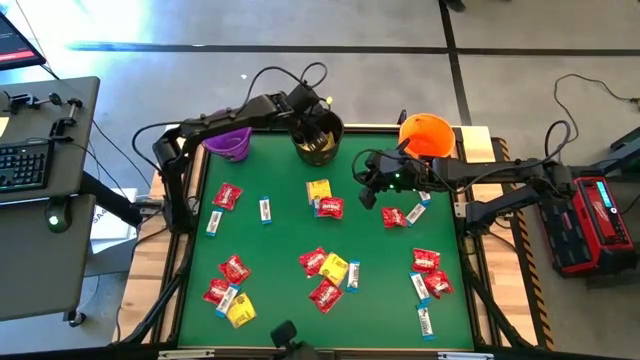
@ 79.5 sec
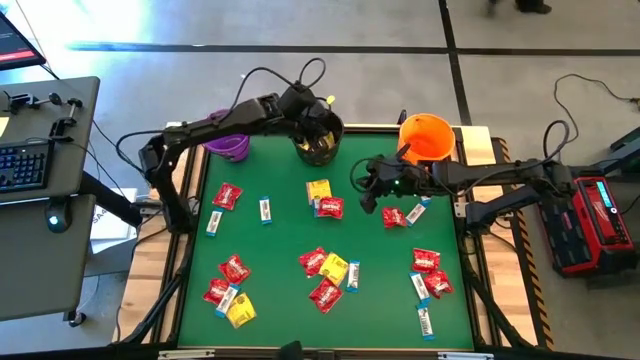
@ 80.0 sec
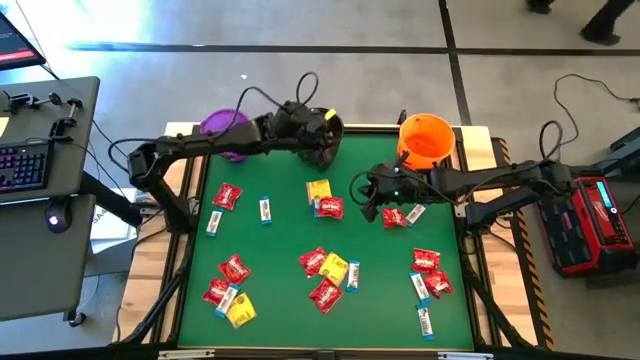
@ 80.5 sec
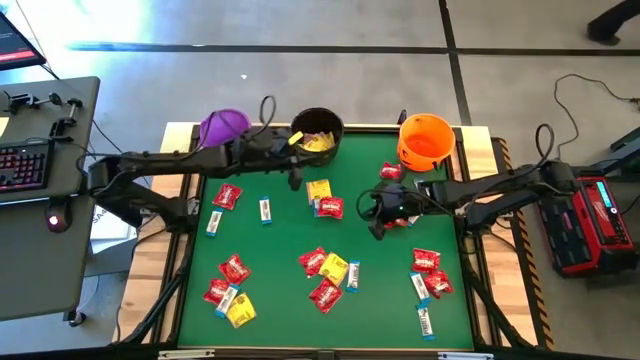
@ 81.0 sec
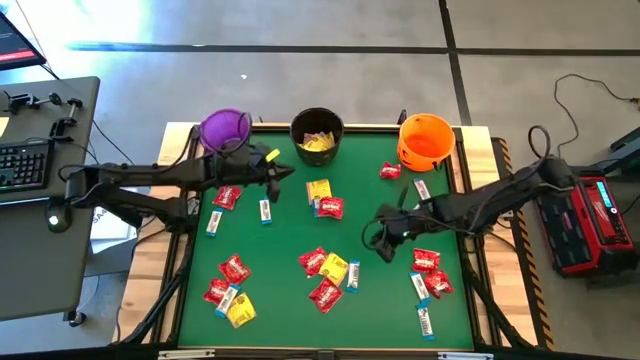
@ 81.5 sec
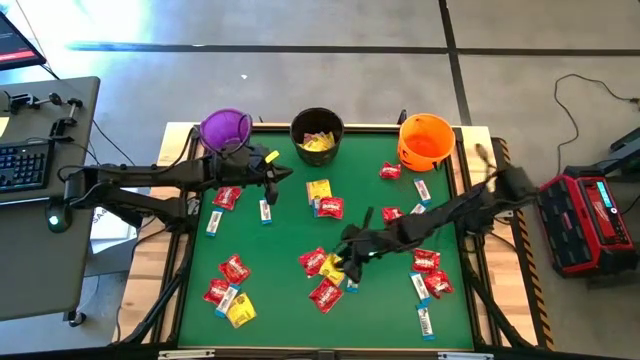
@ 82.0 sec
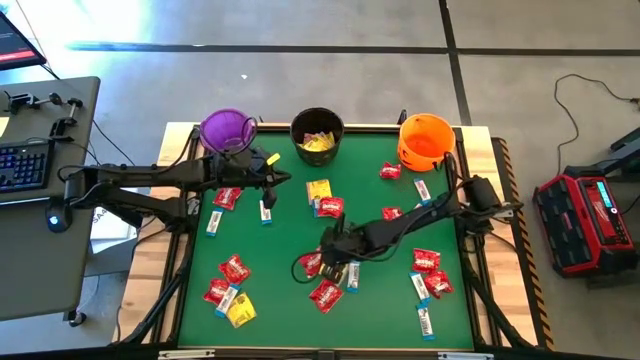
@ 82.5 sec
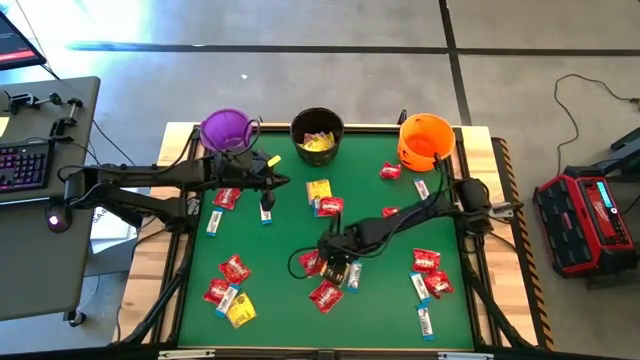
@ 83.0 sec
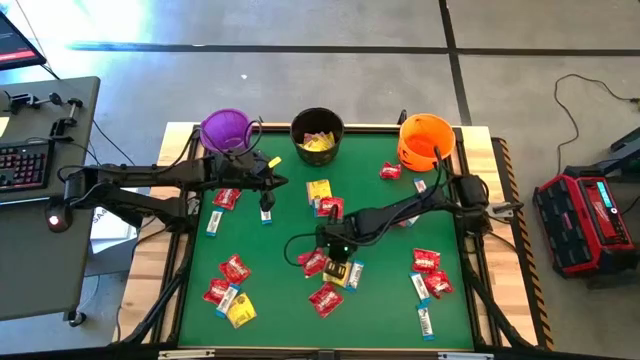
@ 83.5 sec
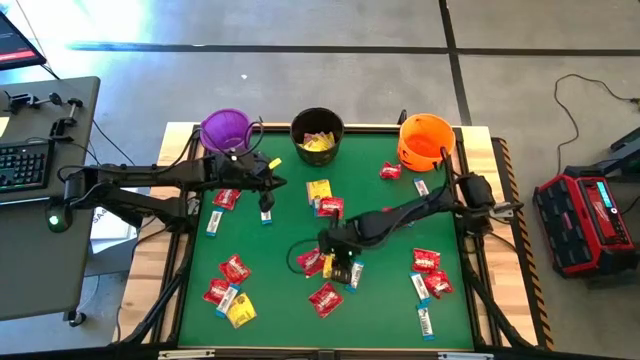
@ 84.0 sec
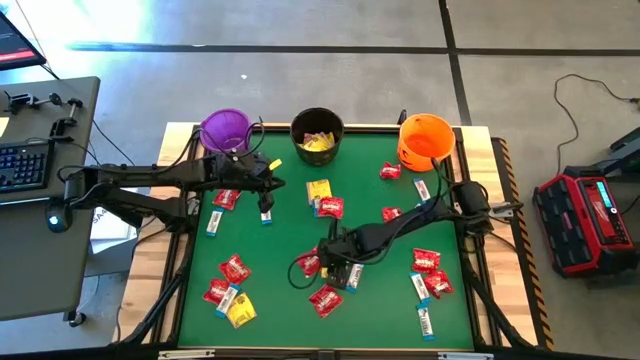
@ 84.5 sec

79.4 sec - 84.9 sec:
Task: Sort candy by brand, put in halloween buckets
Put the yellow candy pack into the black bucket

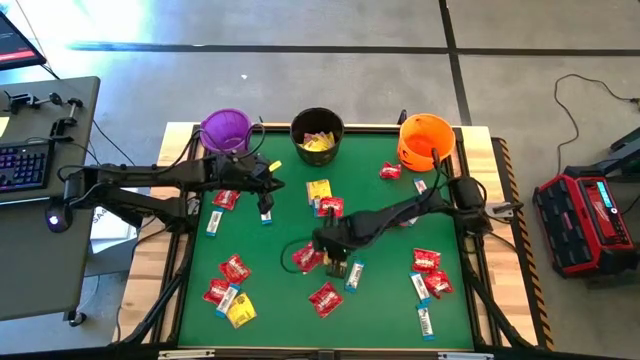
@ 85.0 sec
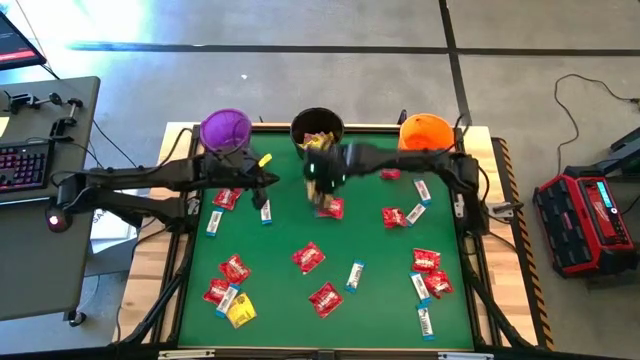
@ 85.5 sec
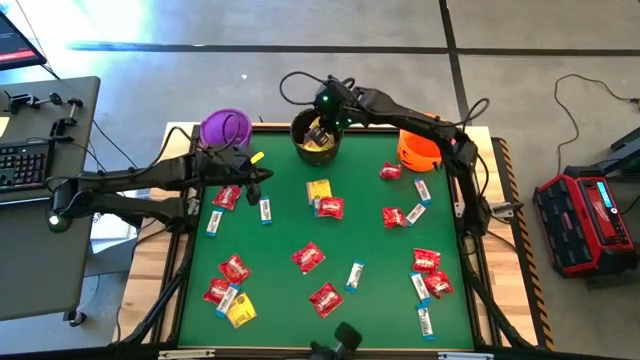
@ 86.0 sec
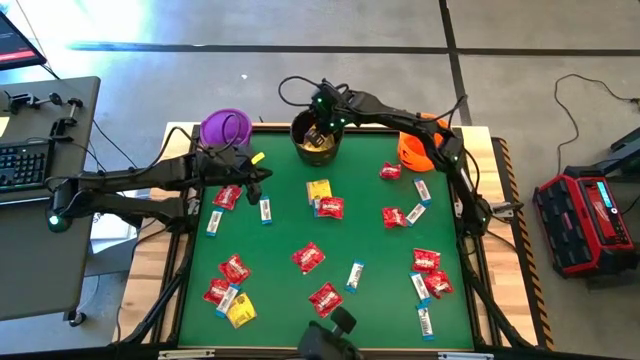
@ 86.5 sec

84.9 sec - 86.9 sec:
Put the yellow candy pack into the black bucket

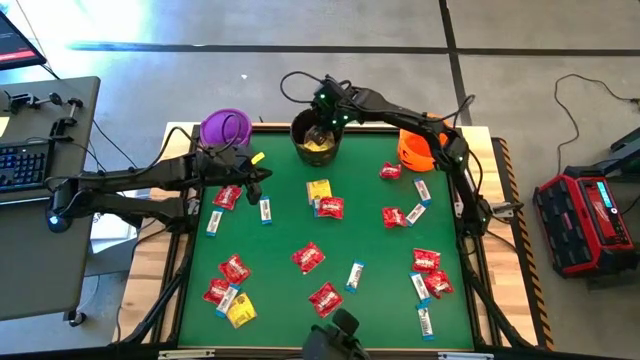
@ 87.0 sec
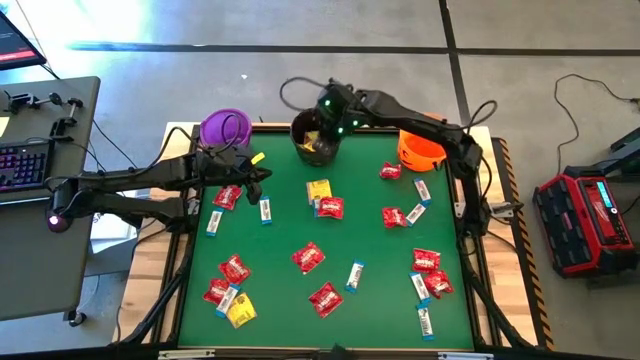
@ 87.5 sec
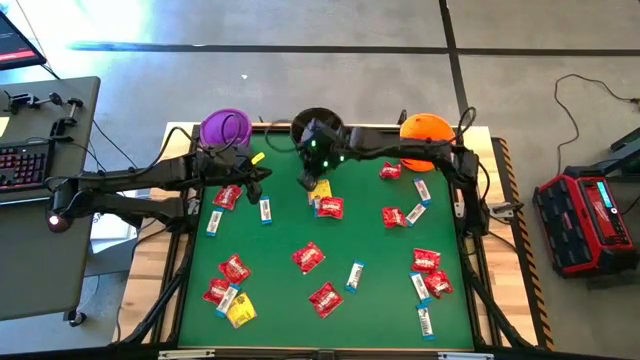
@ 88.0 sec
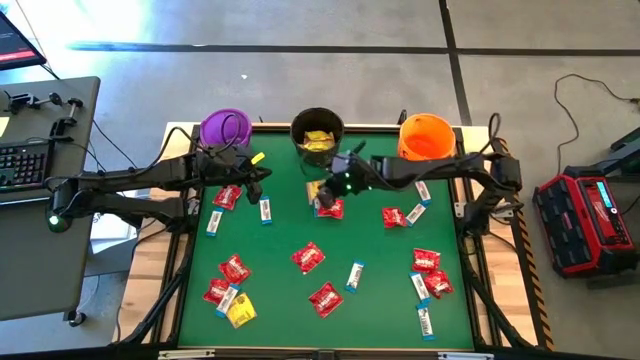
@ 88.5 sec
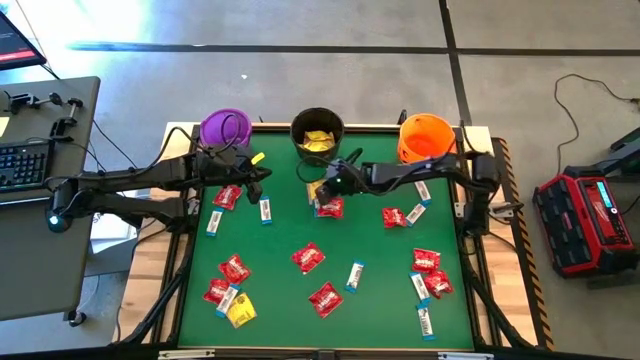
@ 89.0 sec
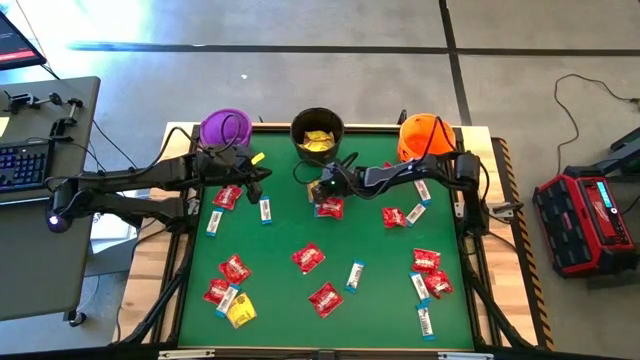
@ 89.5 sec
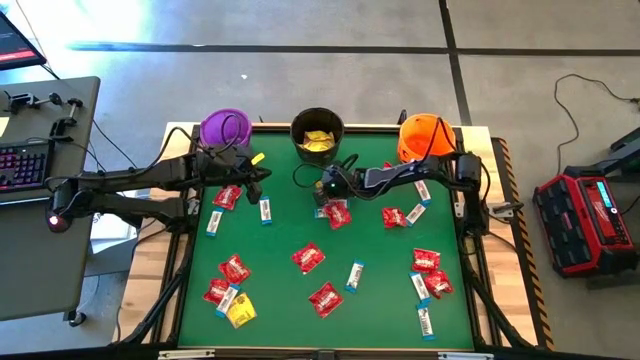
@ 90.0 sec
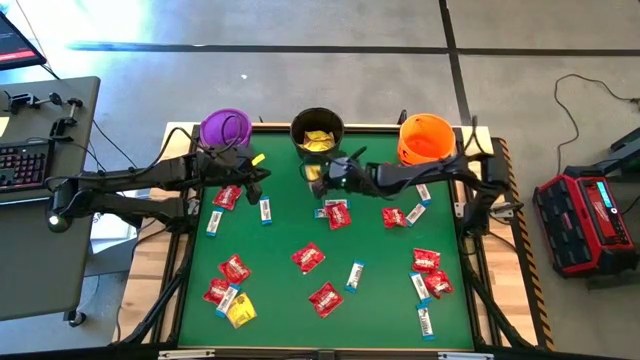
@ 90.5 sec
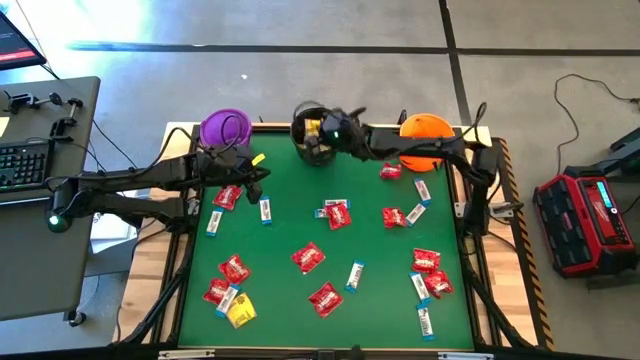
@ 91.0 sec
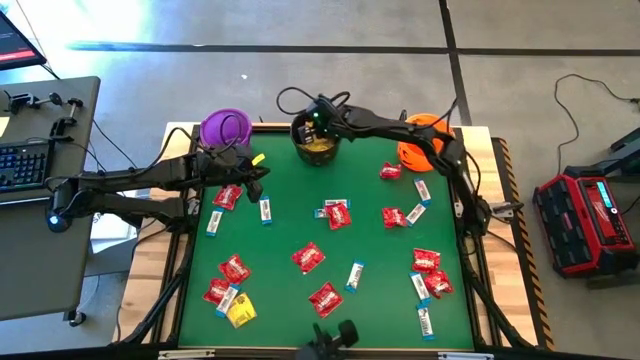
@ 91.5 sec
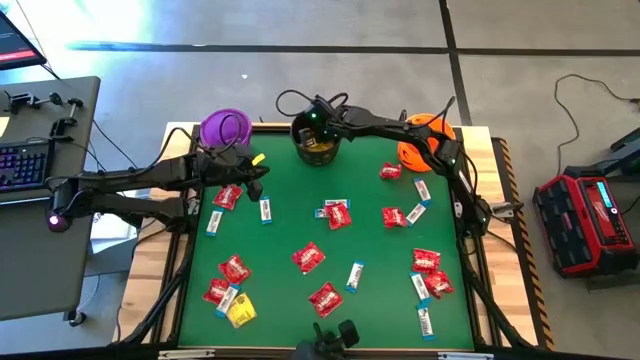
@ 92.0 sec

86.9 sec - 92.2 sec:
Put the yellow candy pack into the black bucket

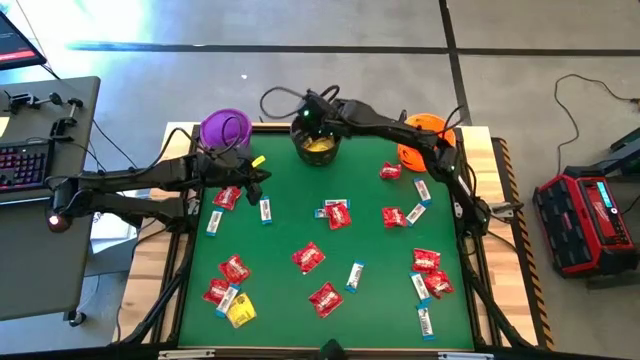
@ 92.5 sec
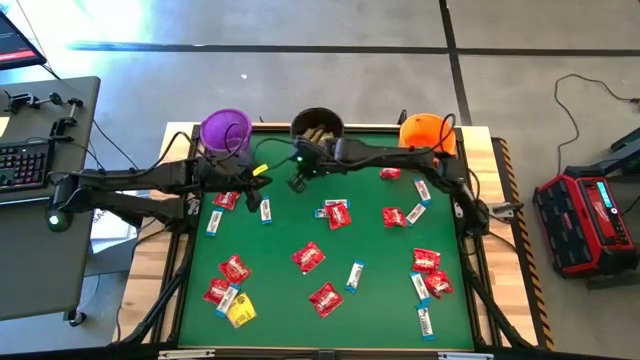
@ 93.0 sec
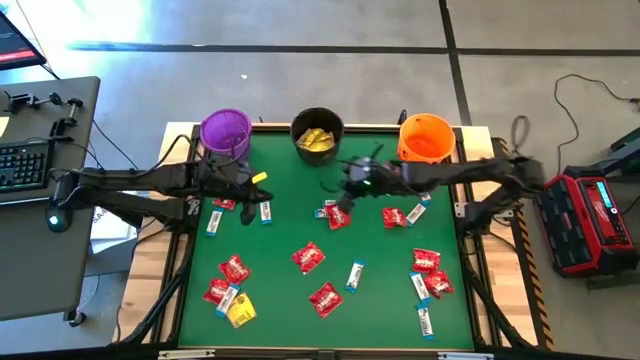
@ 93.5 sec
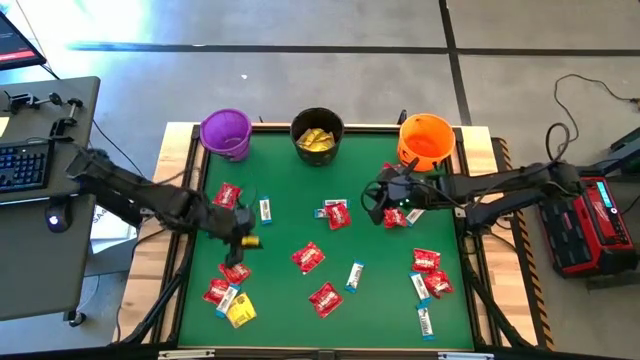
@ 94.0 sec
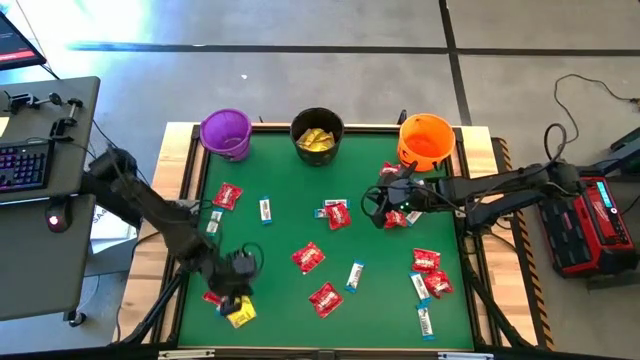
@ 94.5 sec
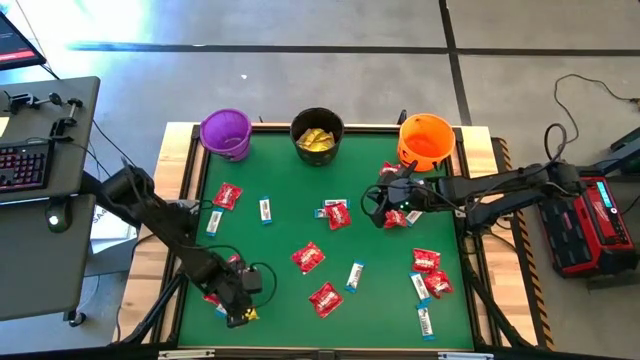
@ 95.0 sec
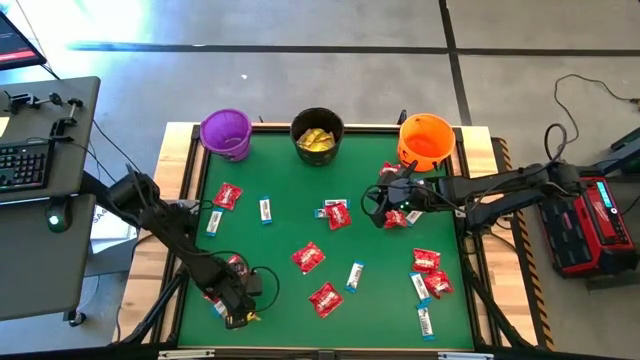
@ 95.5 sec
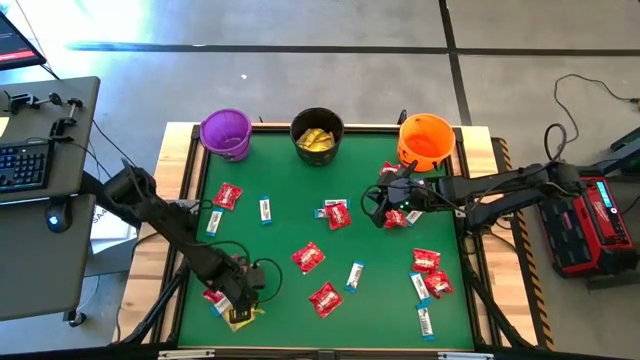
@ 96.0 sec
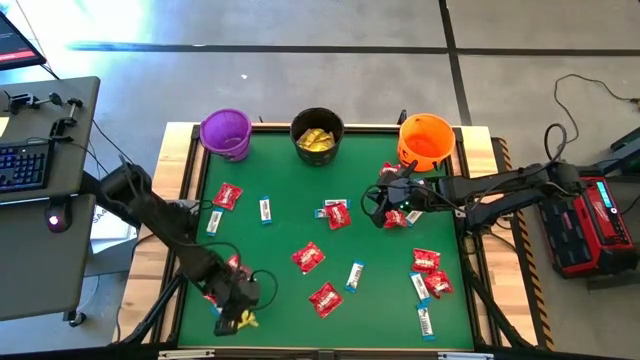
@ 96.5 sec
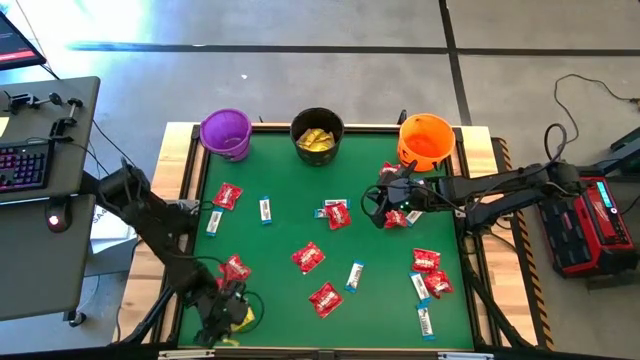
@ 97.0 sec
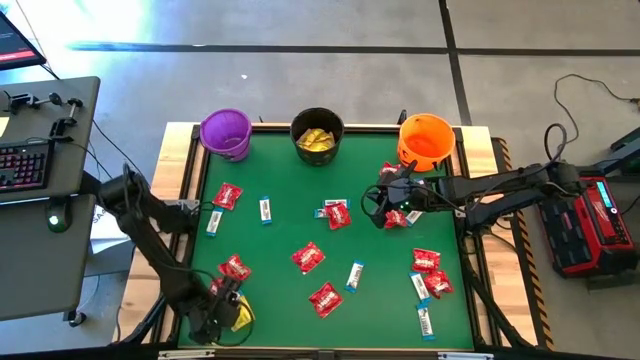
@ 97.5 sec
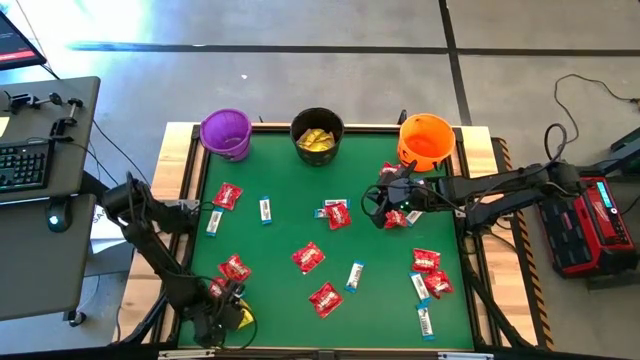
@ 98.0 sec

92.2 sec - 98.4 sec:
Put the yellow candy pack into the black bucket

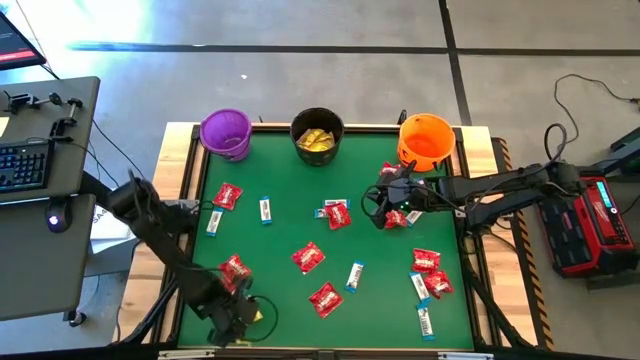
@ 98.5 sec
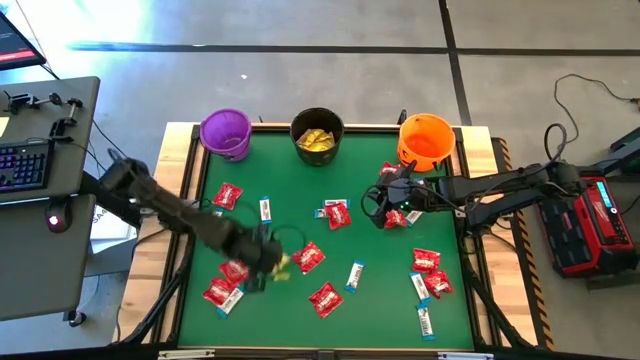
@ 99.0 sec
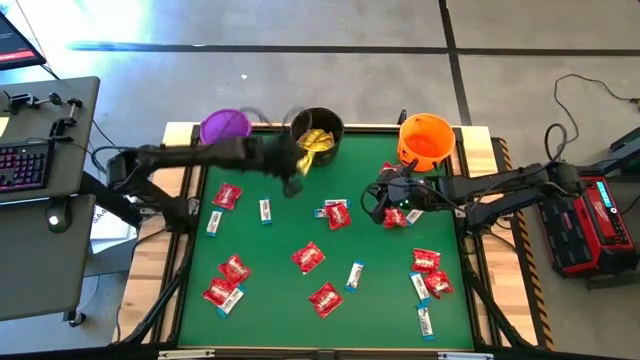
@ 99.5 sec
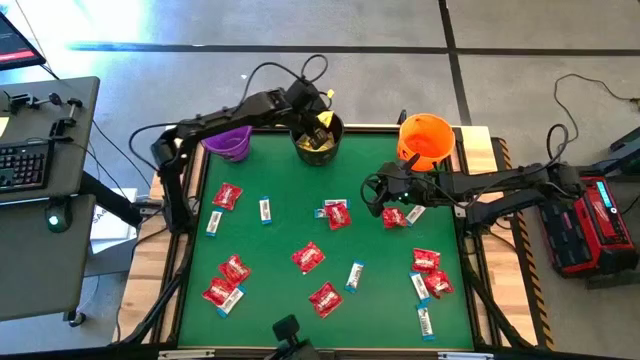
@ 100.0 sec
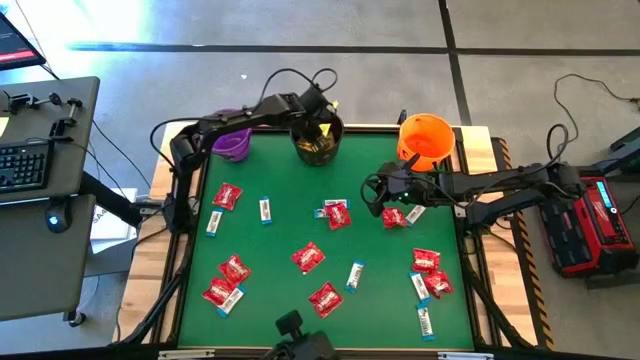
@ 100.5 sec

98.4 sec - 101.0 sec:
Put the yellow candy pack into the black bucket
